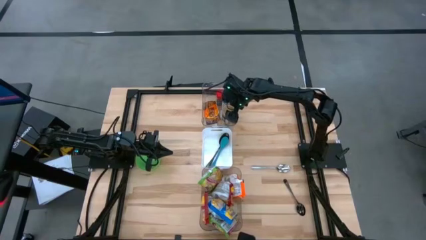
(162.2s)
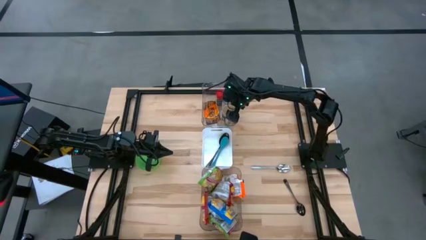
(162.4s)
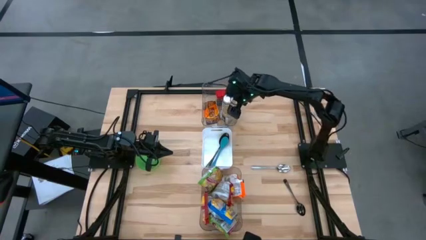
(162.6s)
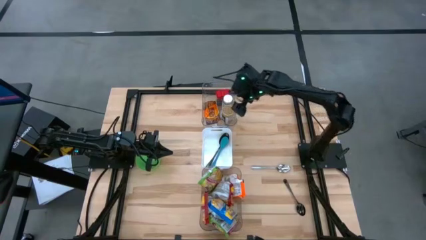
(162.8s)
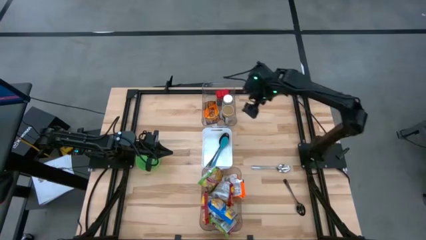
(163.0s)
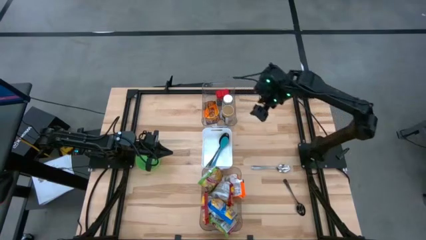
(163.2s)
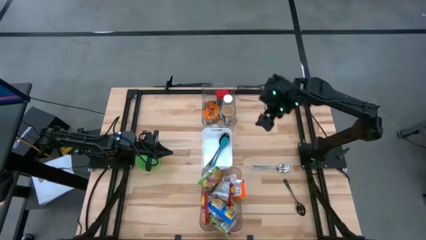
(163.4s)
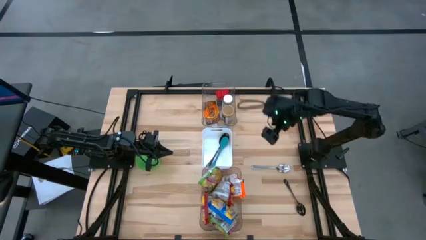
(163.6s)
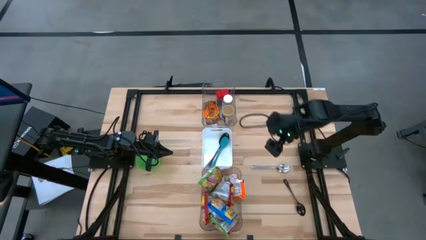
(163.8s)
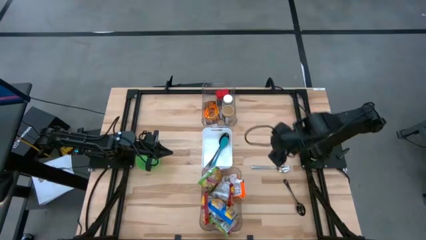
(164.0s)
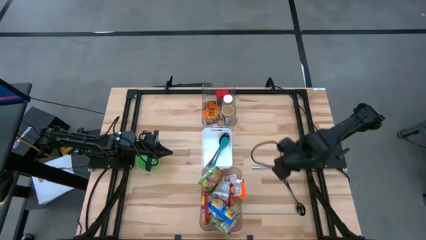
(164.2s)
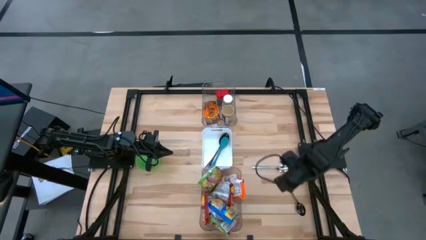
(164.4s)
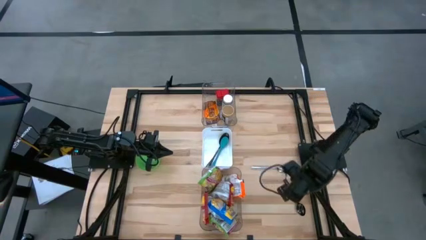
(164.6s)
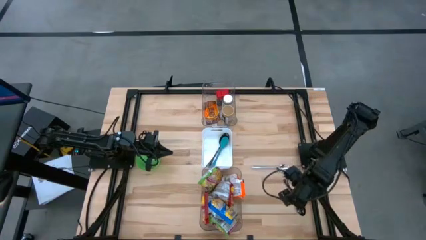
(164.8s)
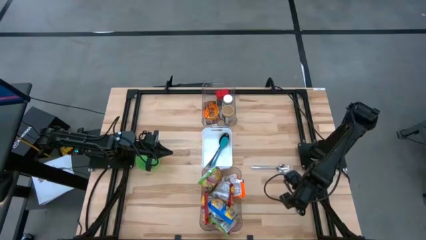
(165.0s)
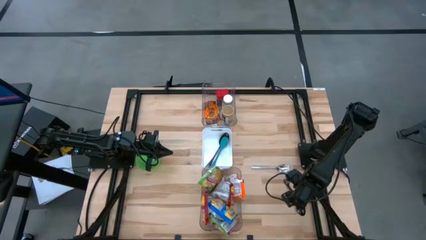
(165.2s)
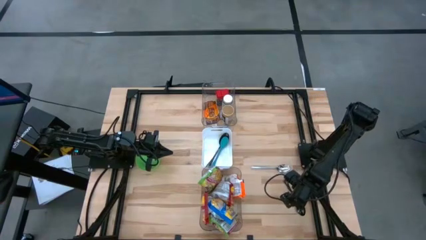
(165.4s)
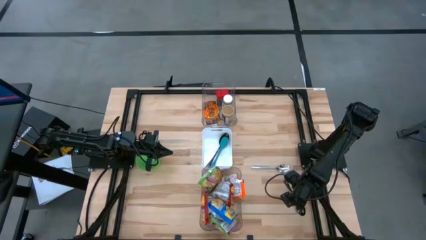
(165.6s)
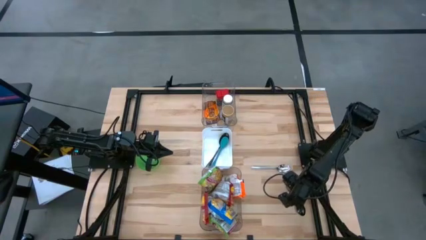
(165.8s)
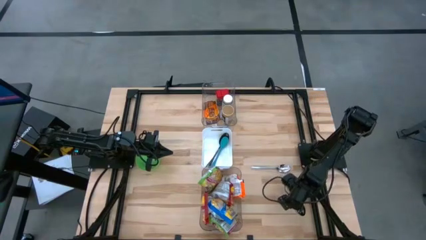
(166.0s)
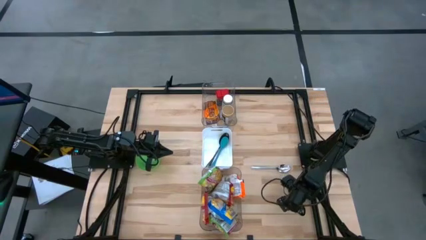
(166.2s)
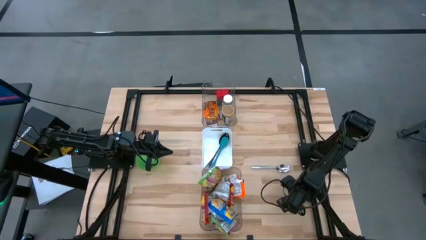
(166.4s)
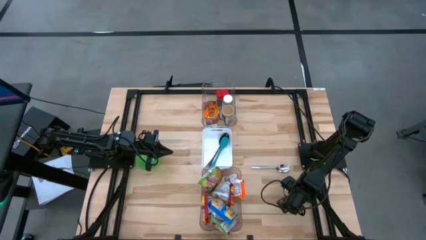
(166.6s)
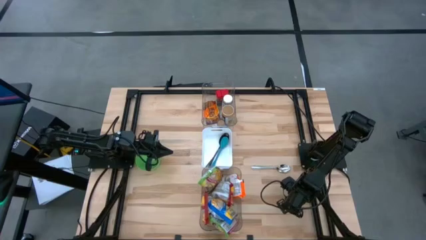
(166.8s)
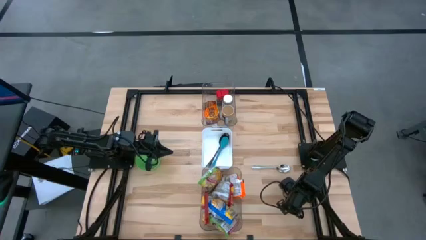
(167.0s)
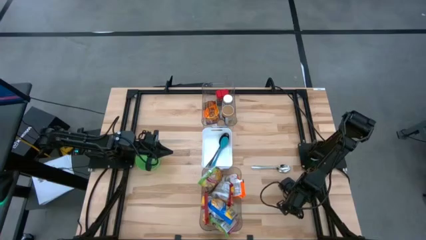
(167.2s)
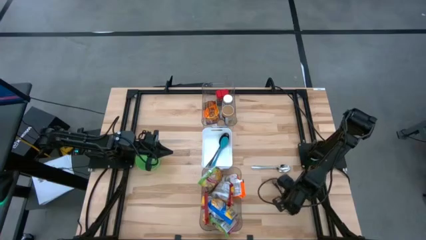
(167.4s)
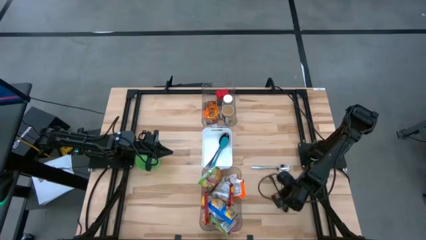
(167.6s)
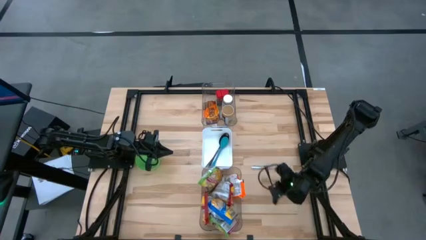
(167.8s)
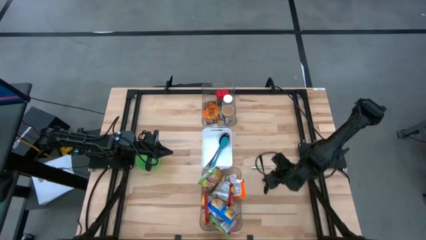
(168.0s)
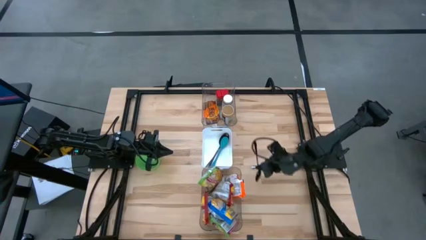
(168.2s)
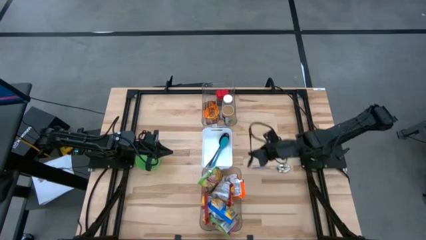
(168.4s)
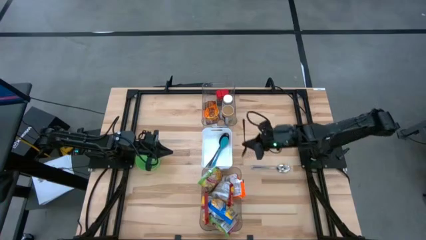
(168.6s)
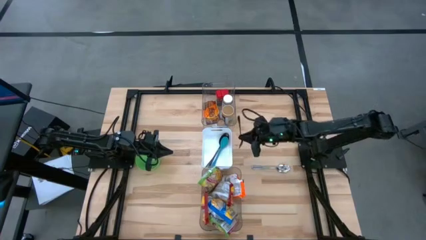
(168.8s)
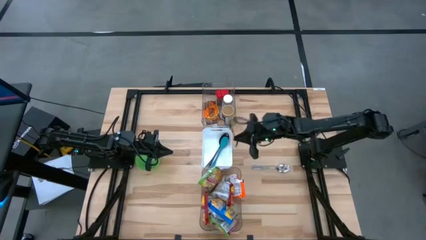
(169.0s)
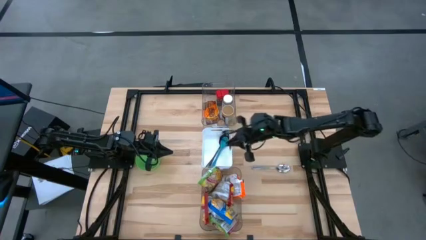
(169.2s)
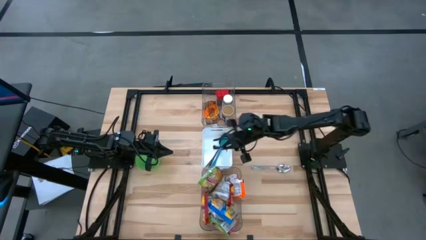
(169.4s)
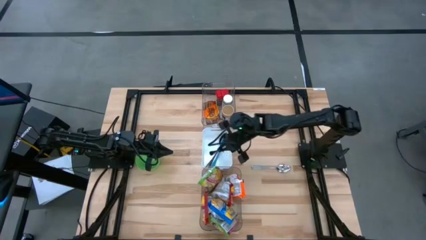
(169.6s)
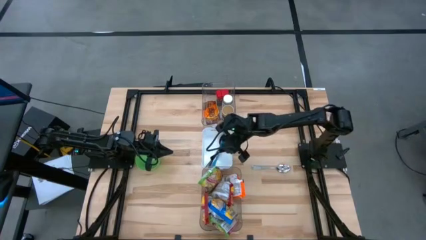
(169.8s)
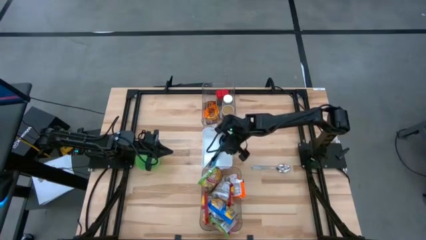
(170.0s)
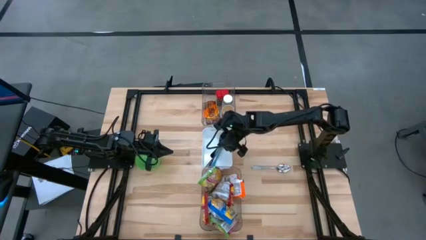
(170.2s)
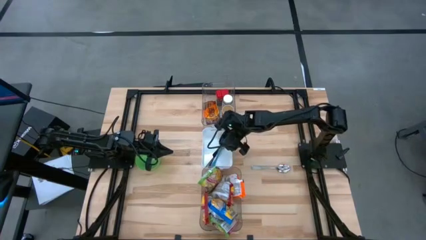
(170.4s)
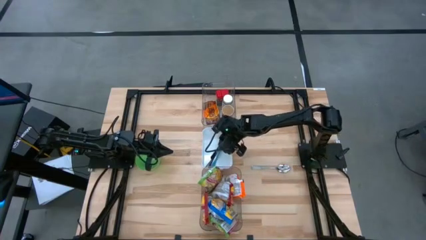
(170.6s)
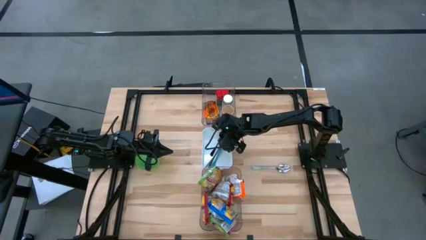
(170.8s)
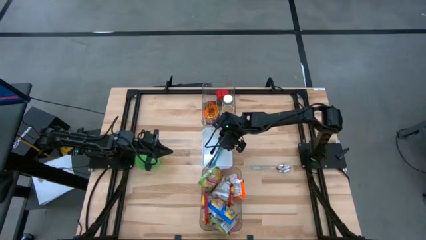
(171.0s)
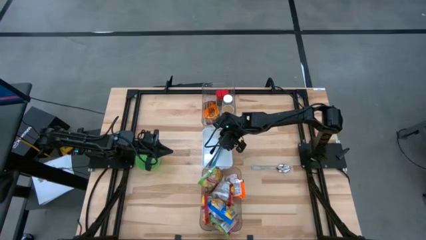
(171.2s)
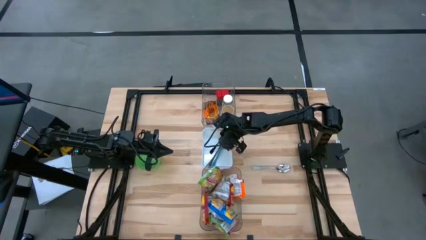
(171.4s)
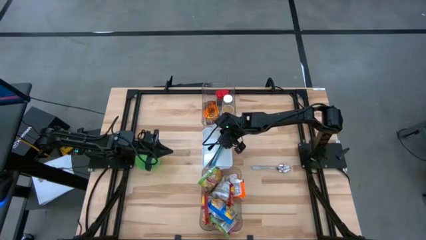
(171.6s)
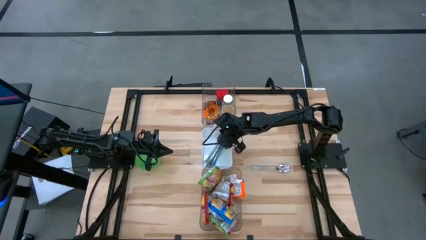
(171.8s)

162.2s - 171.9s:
Task: Pick & Place Food Item
Put the black spoon into the white bin

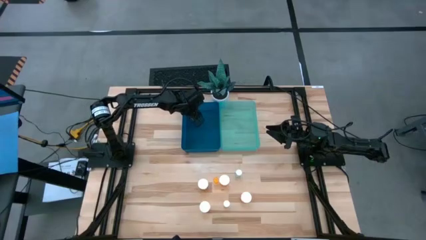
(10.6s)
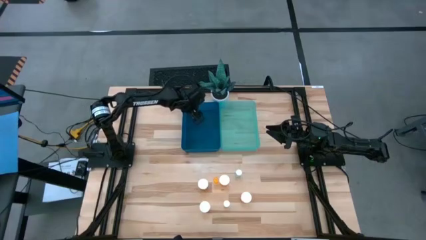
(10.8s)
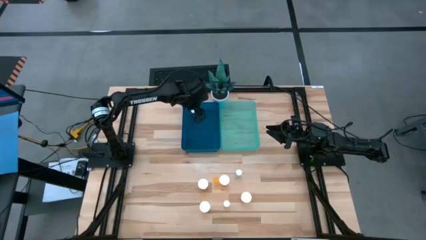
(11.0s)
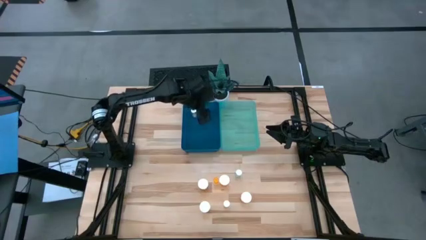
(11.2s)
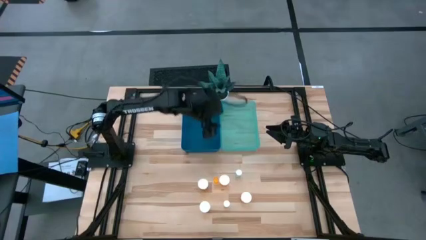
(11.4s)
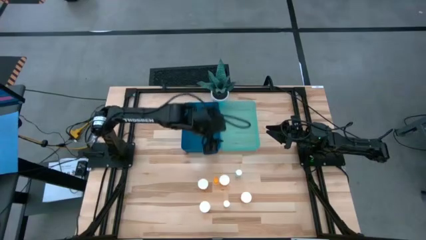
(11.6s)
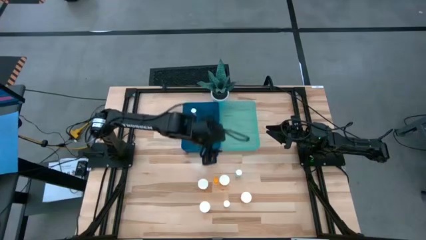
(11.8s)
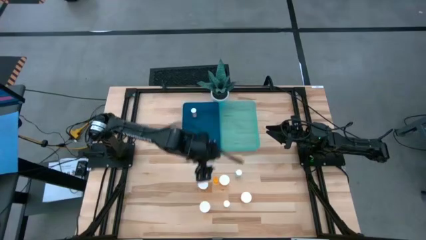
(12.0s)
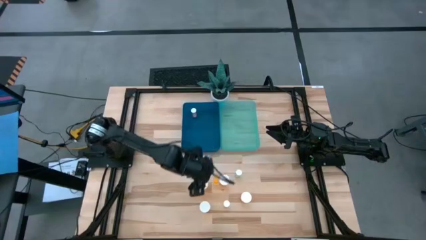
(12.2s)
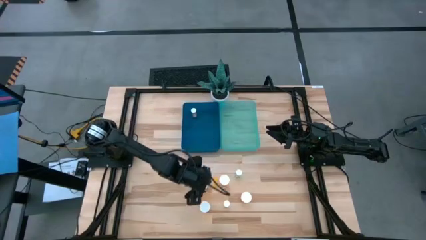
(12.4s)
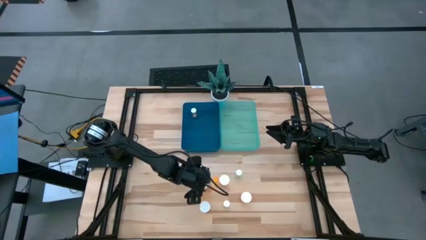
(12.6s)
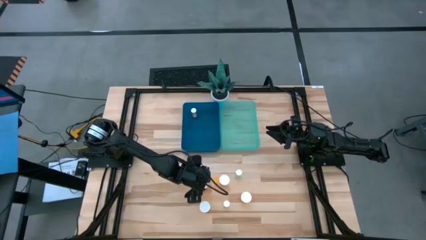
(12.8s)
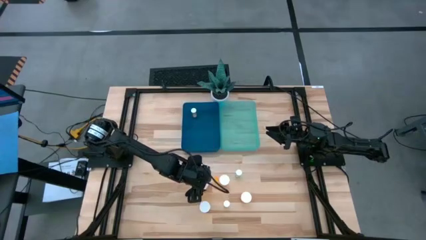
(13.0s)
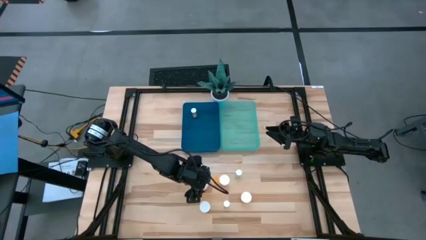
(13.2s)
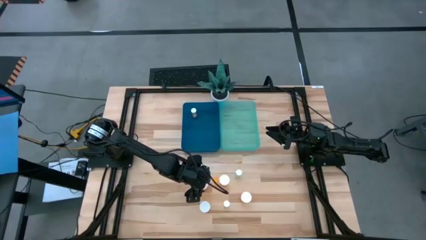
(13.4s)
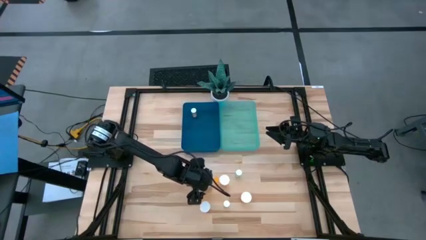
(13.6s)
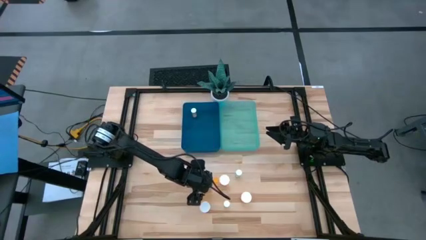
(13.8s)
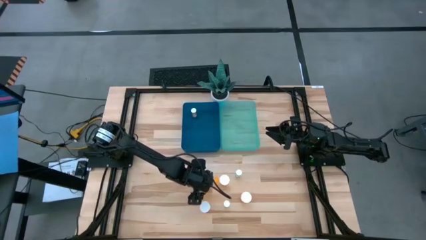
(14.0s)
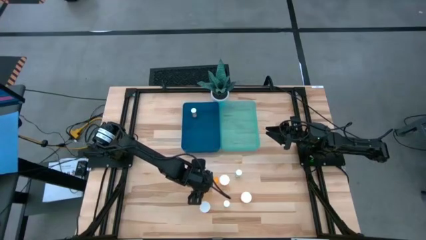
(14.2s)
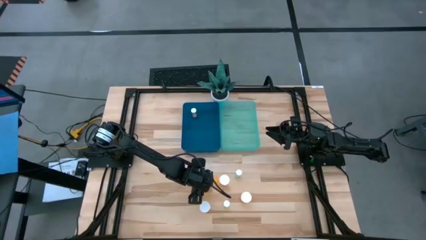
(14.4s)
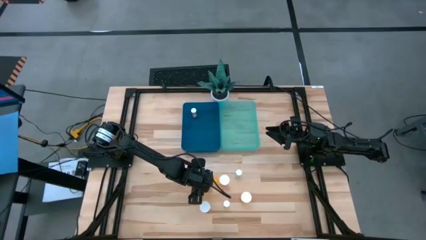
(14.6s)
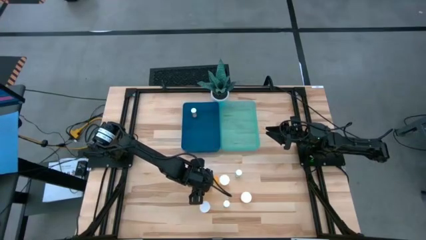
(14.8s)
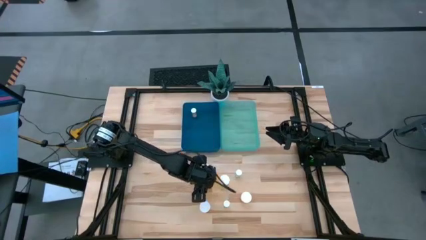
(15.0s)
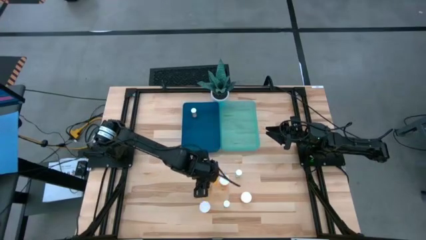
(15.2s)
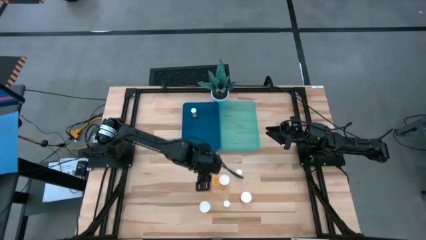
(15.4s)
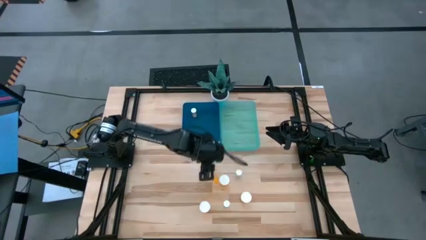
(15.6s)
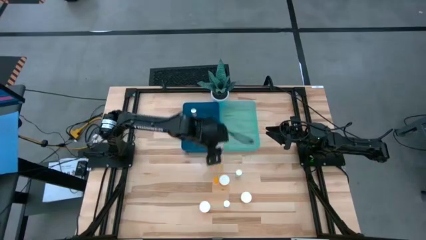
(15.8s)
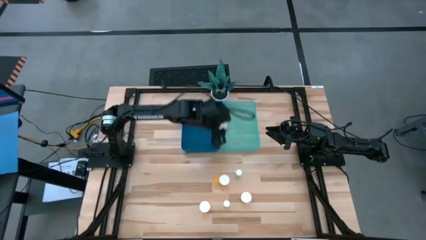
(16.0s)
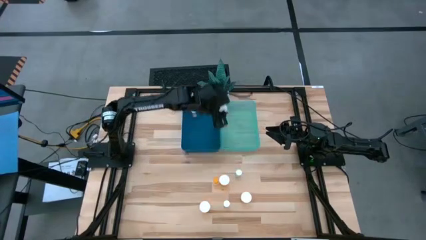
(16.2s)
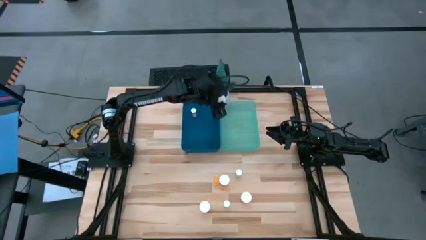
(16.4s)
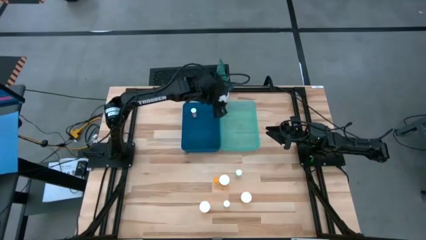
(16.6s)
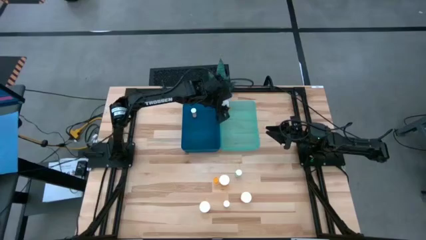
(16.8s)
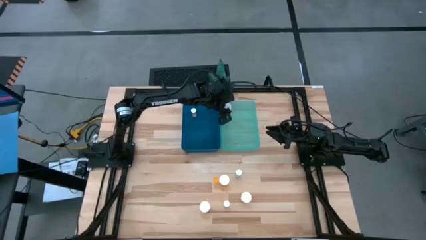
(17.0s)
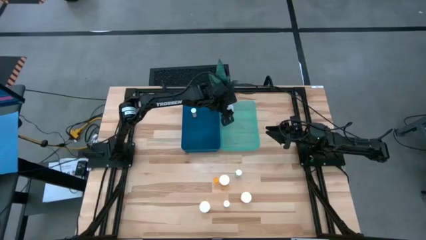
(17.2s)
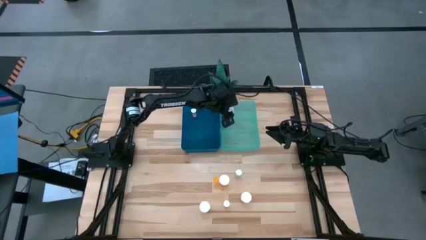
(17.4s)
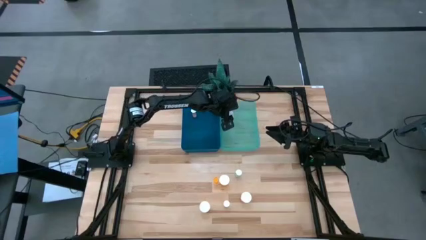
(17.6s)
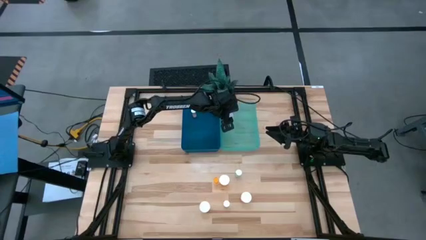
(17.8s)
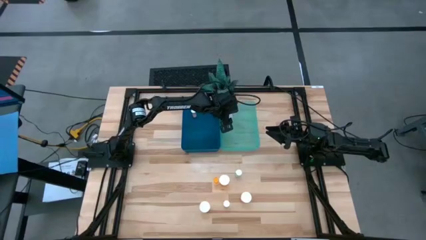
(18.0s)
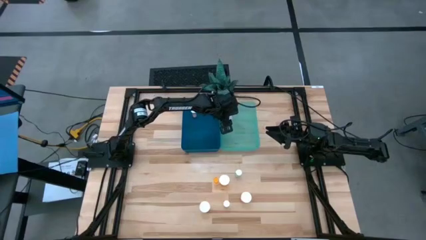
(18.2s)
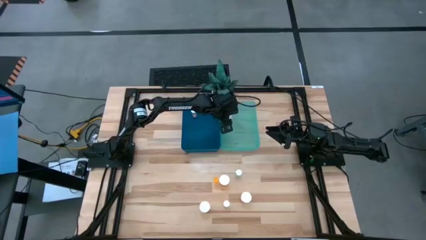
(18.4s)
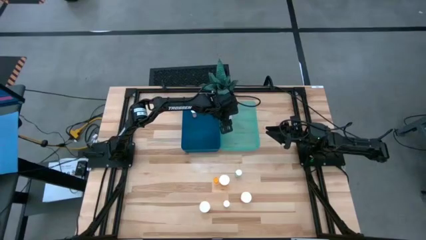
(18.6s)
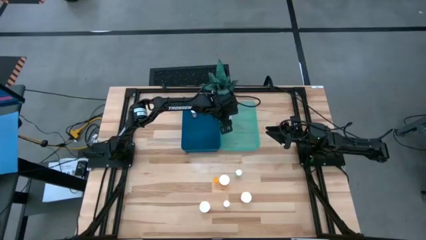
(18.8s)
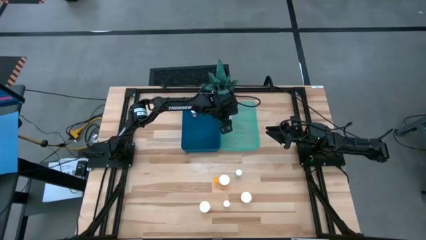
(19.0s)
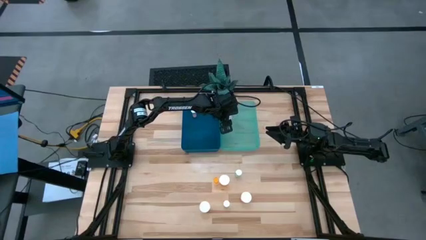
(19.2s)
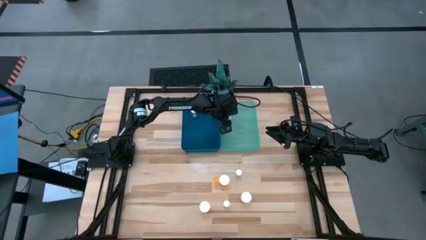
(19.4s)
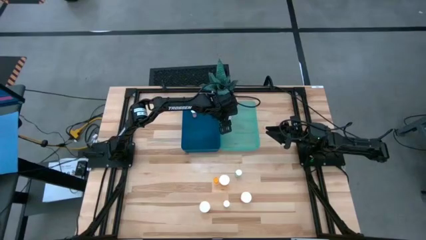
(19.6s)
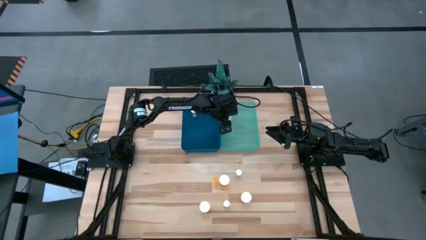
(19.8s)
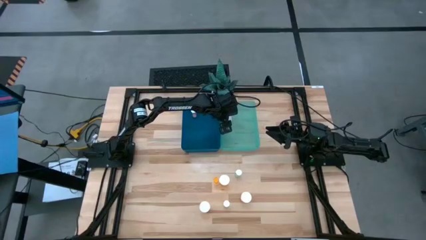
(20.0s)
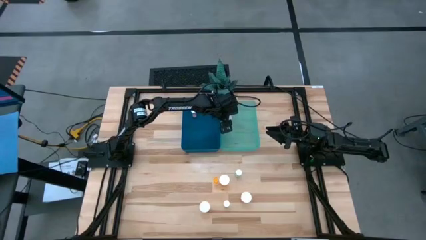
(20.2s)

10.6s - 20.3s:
Task: Pick and place medicine bottles into bin by pill shape (circle, oval)
Put the large orange capsule bottle into the green bin
